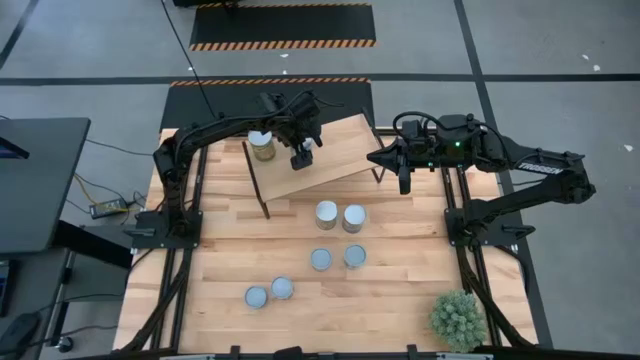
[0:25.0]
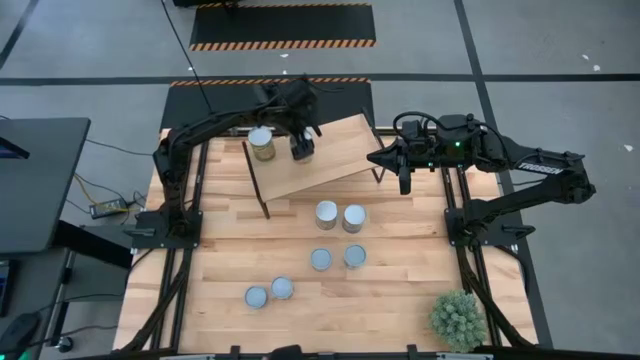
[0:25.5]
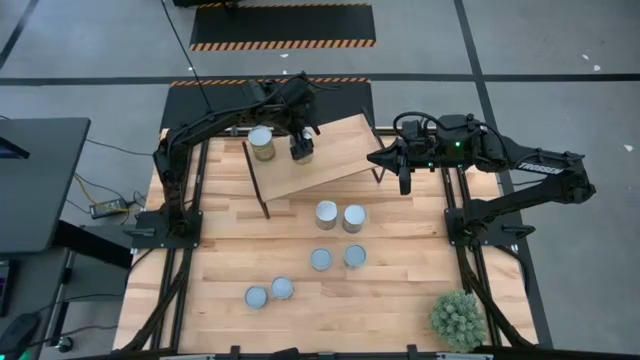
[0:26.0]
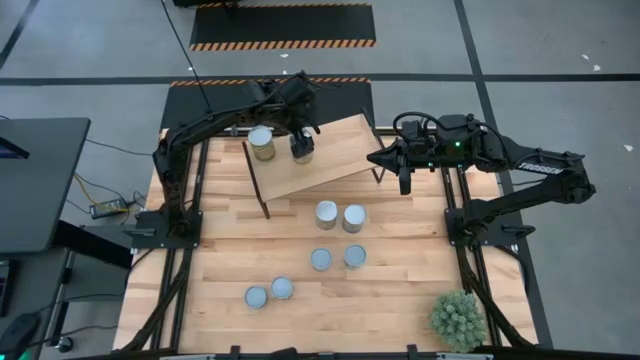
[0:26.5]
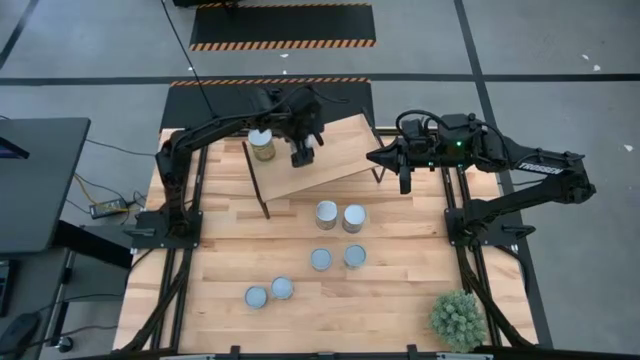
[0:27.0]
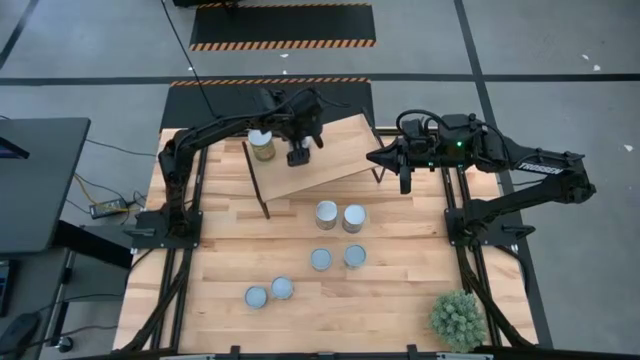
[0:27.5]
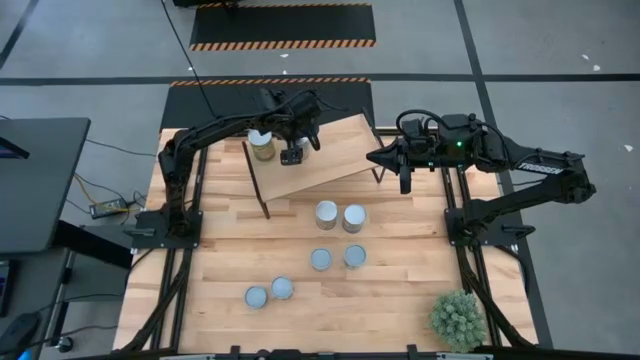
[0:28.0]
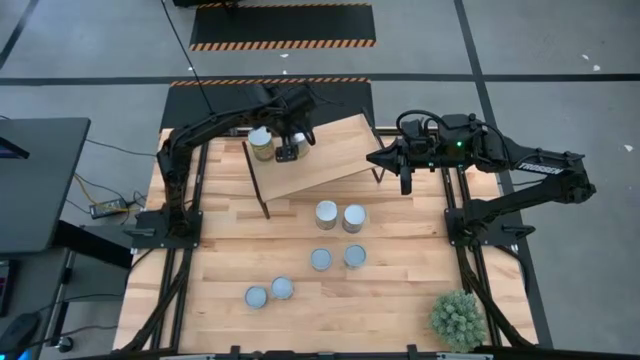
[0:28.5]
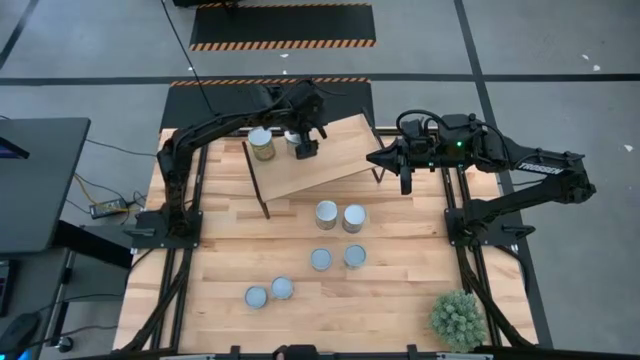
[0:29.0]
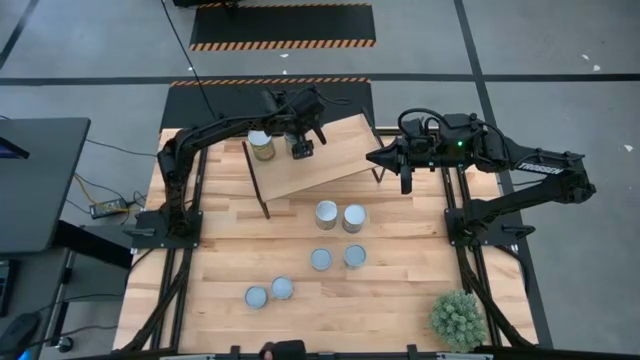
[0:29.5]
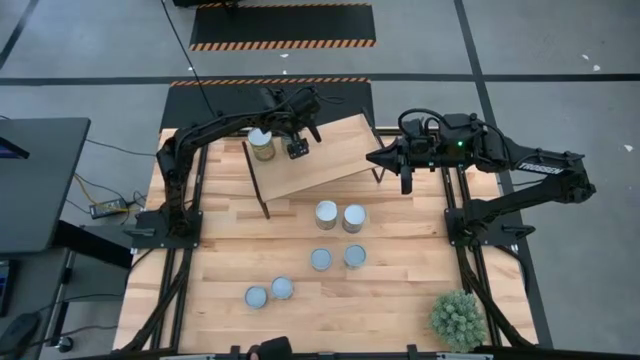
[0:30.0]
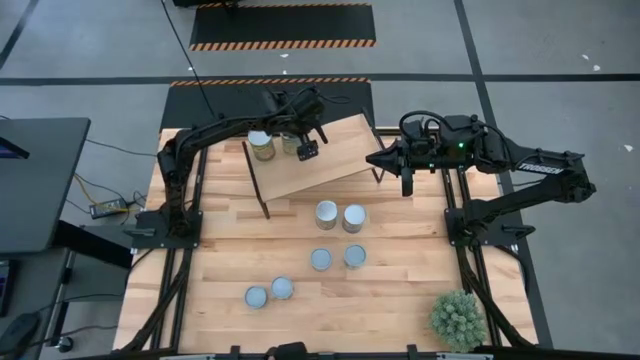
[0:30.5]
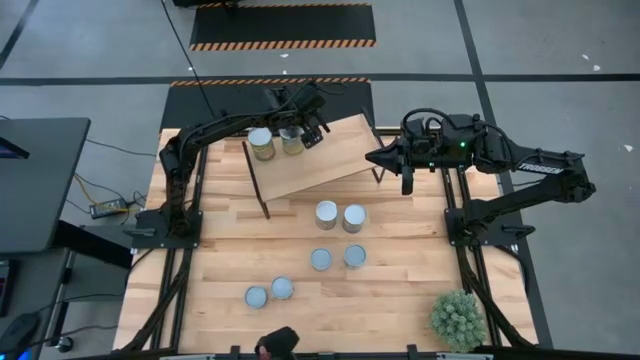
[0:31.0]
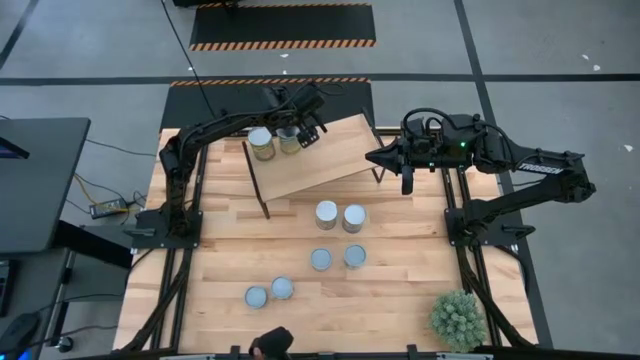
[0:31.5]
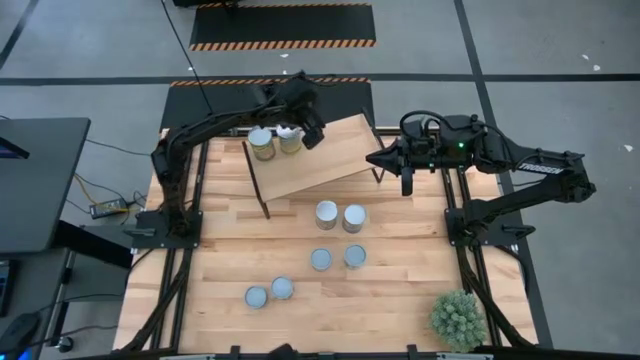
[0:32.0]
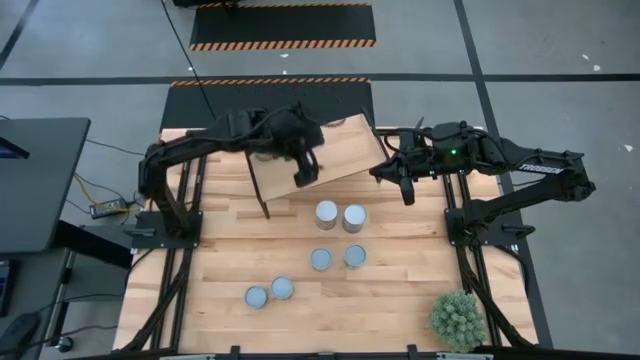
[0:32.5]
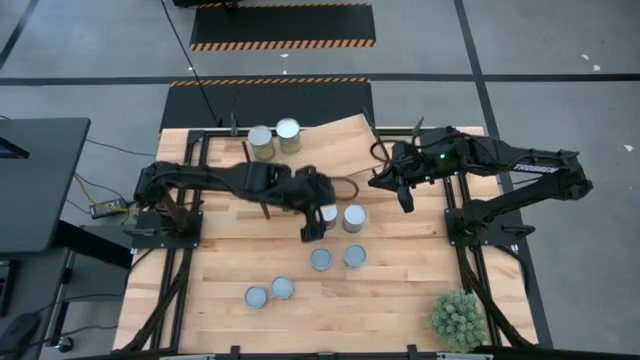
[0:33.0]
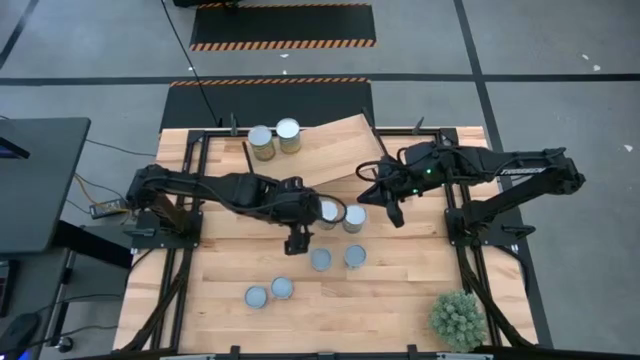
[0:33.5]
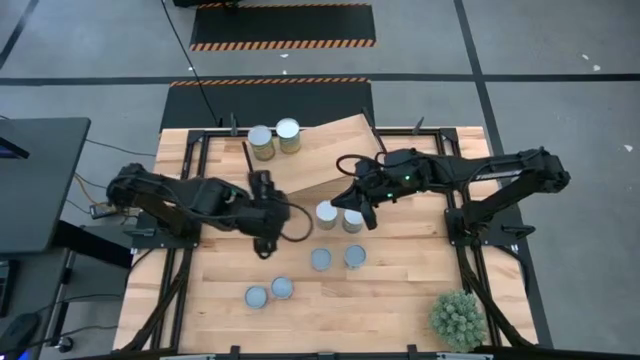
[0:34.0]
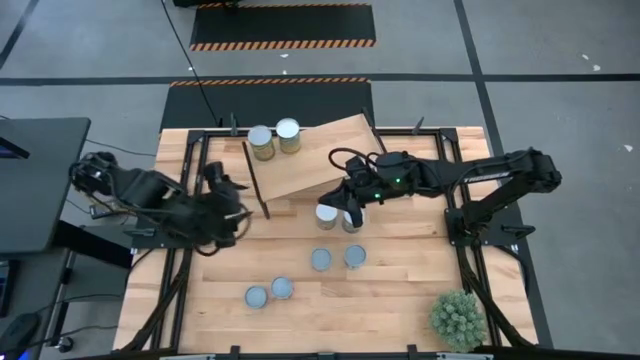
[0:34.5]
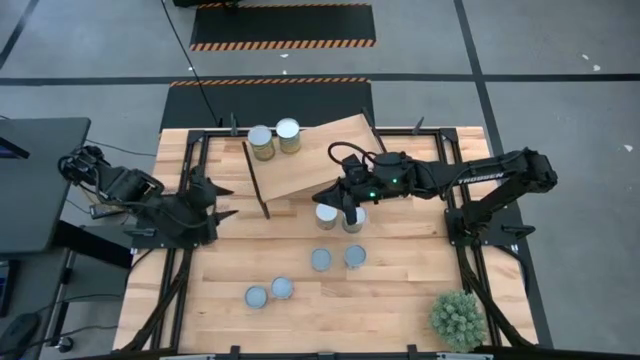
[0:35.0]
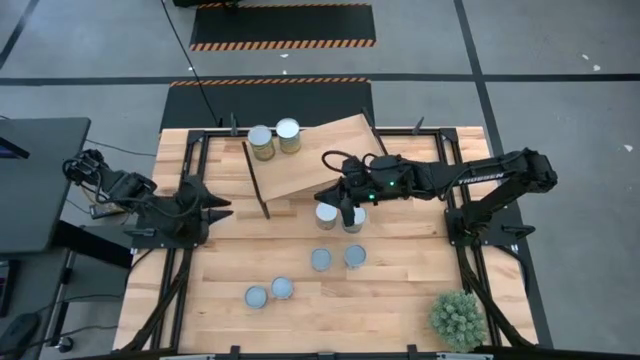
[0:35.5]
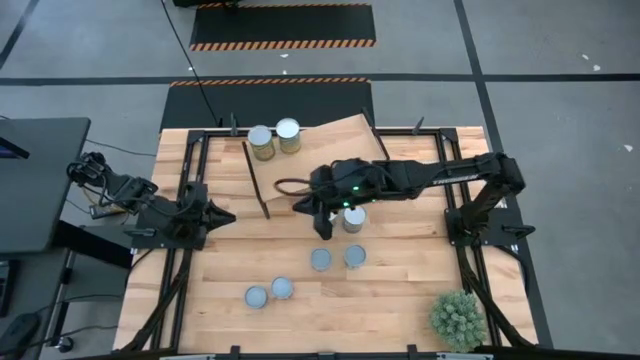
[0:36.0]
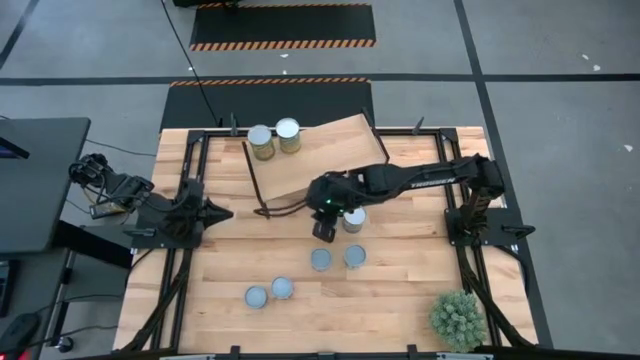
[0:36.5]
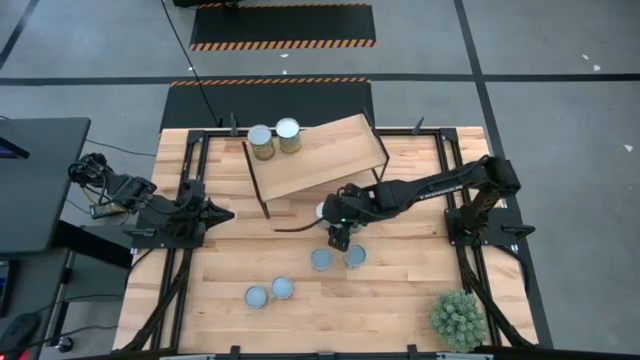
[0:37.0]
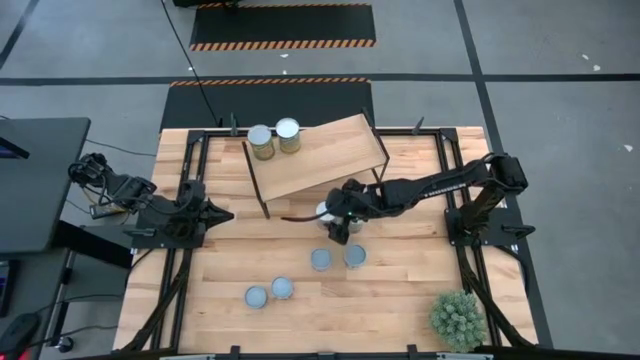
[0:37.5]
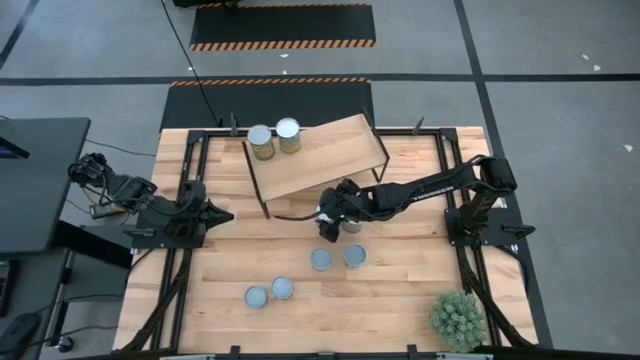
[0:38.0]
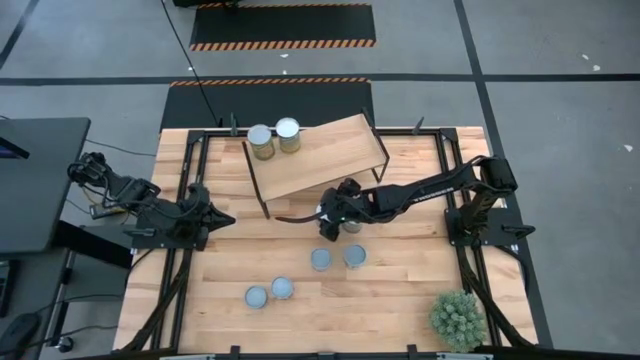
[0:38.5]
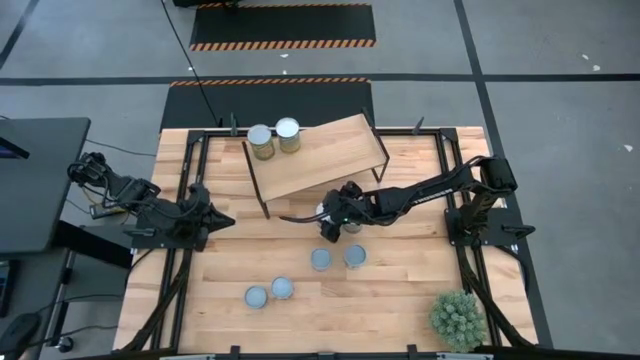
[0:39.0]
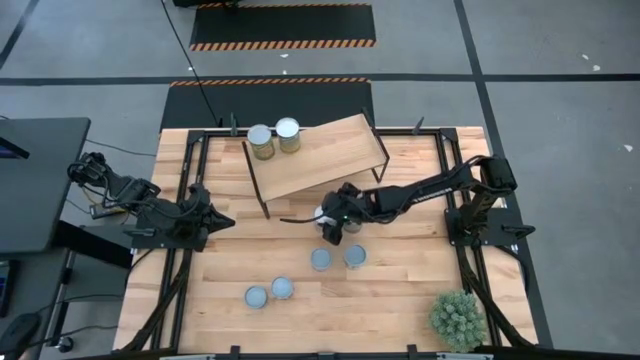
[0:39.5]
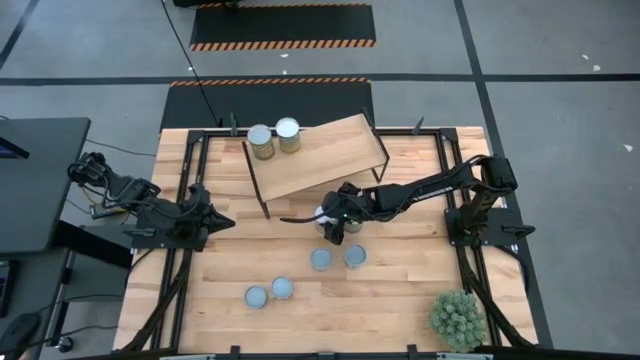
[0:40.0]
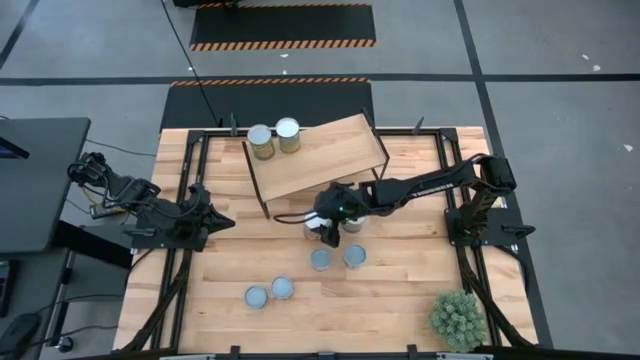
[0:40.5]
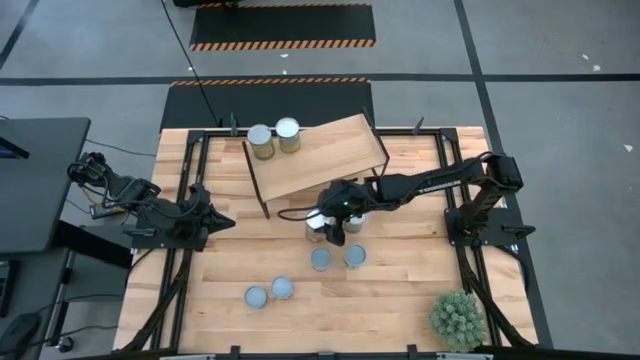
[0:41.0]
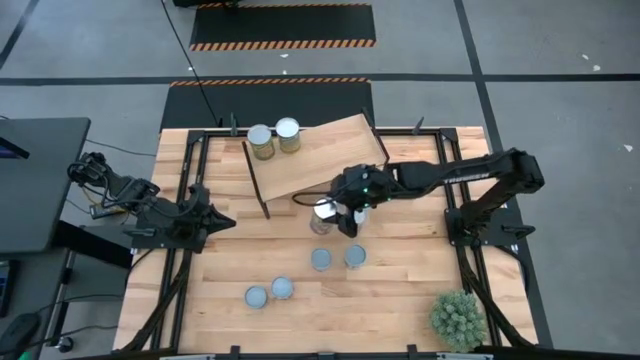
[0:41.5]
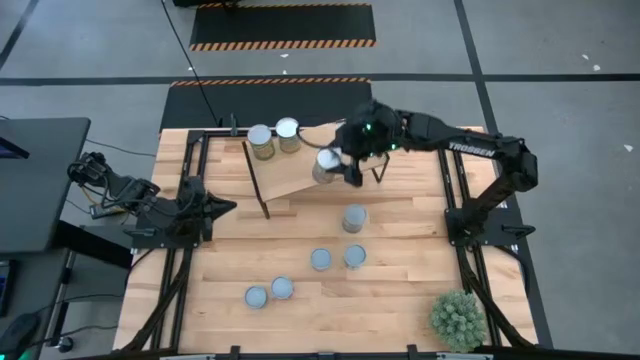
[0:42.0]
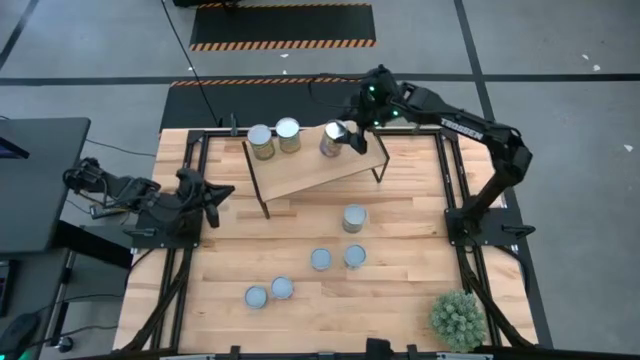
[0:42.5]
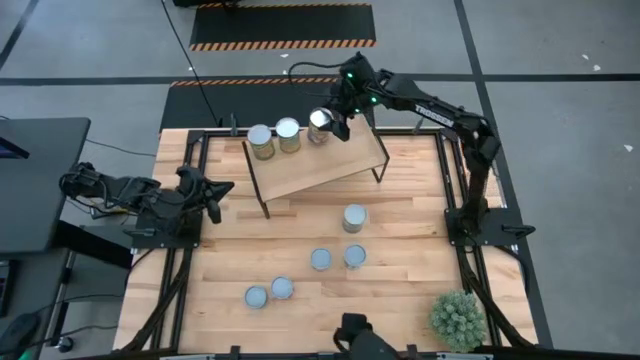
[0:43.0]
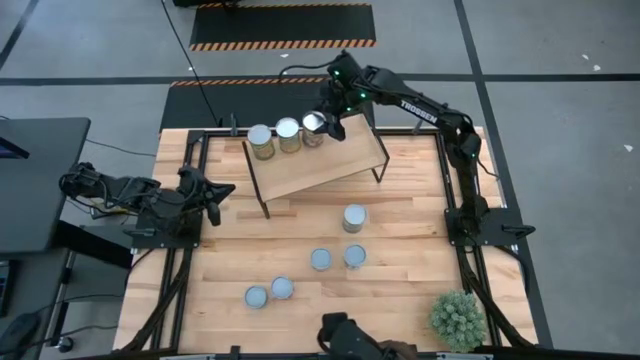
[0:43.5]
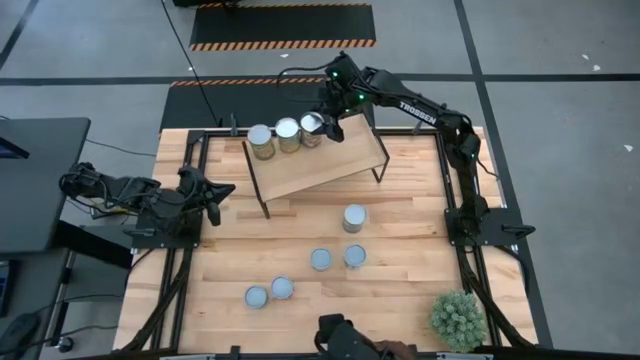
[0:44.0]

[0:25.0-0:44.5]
Task: Pick and place cans onto a shelf
Put the peach can on the shelf

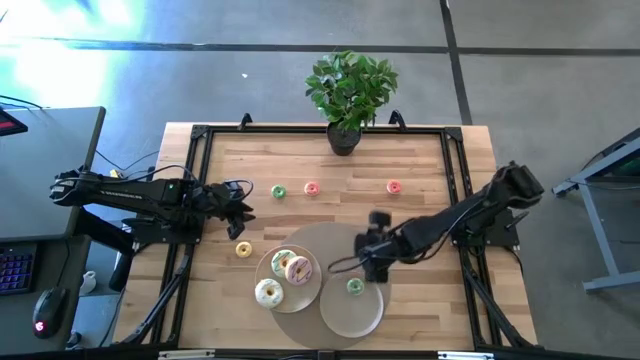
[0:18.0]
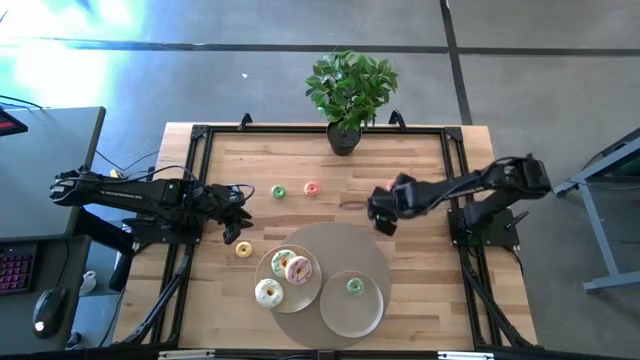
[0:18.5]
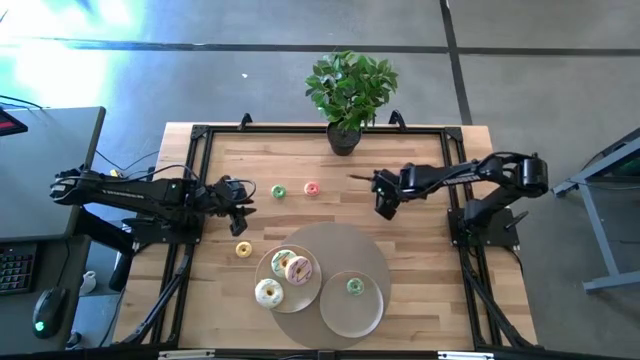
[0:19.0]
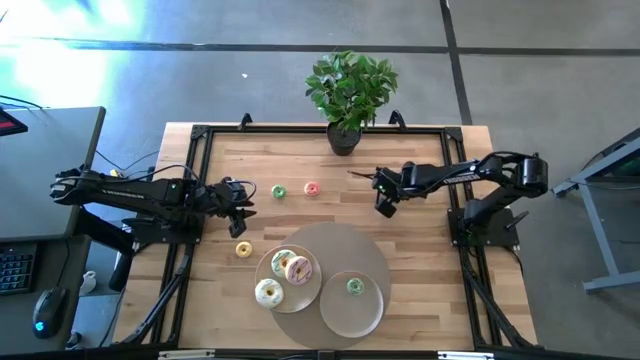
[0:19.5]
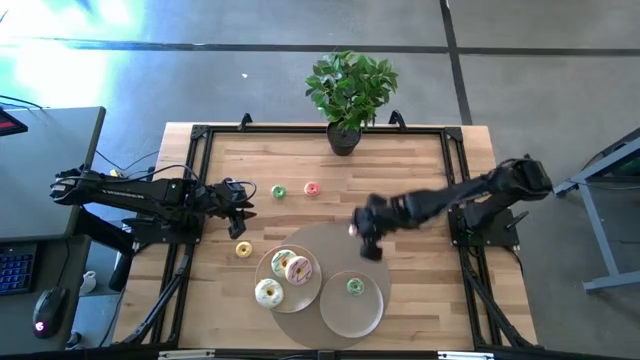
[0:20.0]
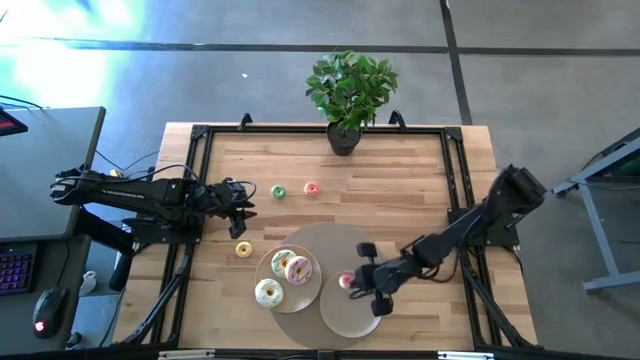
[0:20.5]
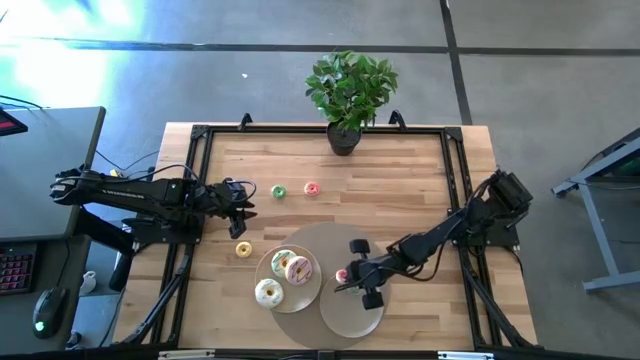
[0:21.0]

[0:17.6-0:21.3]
Task: Pick & Place donuts
Put the small pink donut on the right white plate
